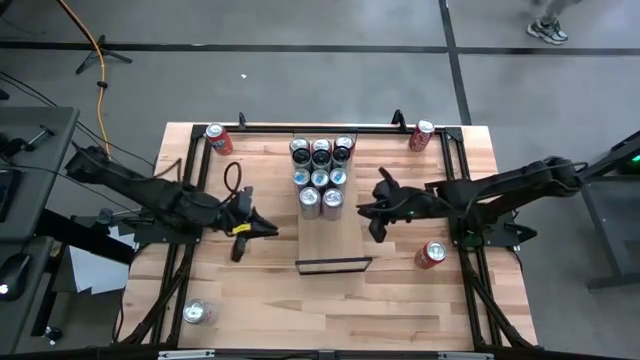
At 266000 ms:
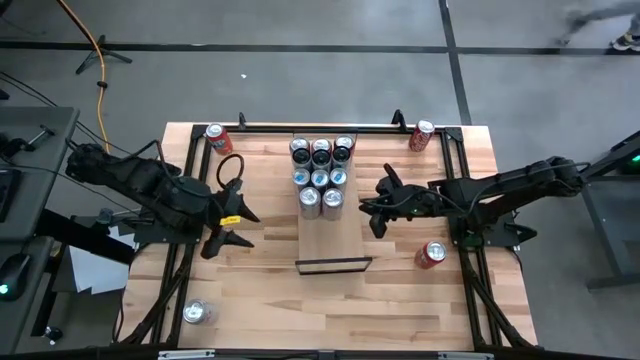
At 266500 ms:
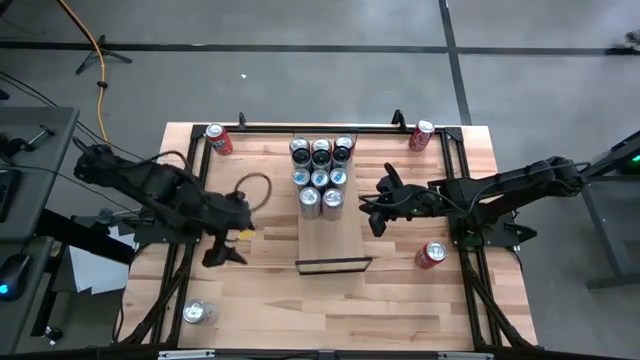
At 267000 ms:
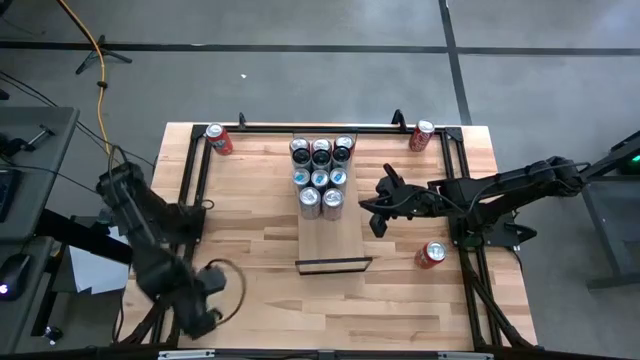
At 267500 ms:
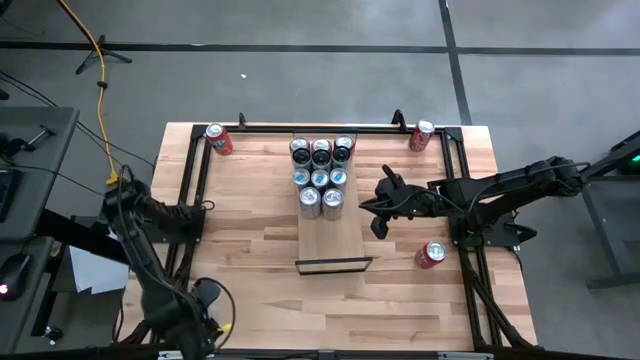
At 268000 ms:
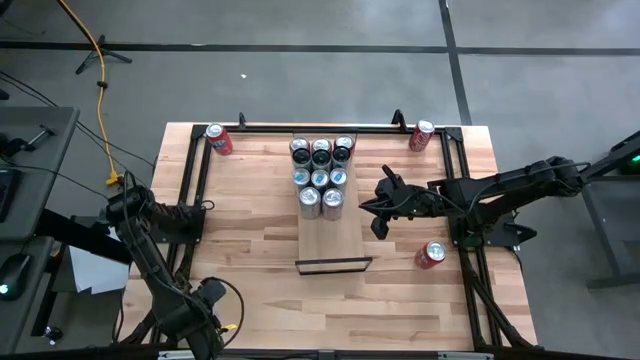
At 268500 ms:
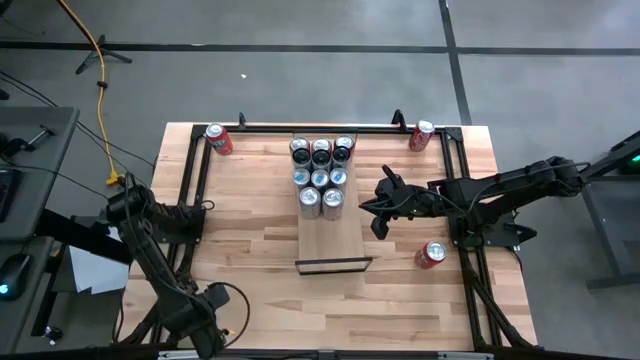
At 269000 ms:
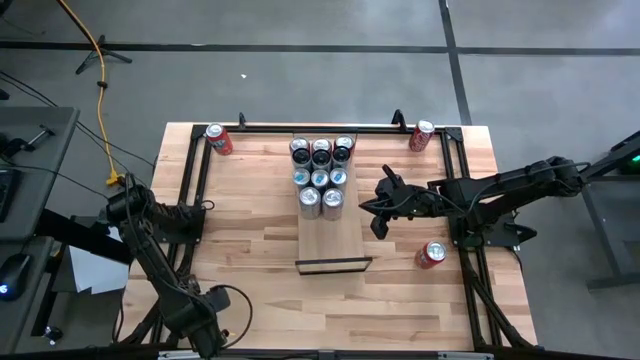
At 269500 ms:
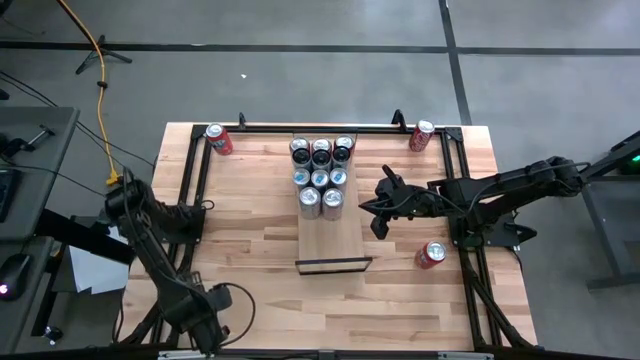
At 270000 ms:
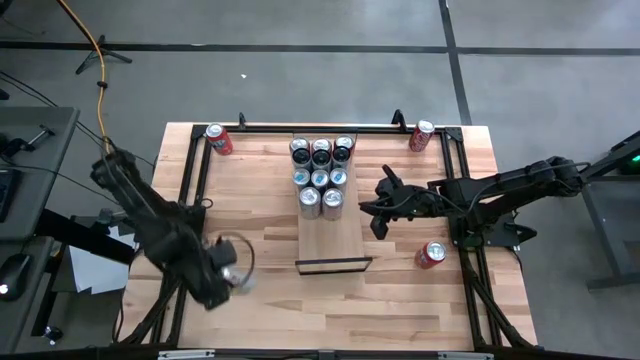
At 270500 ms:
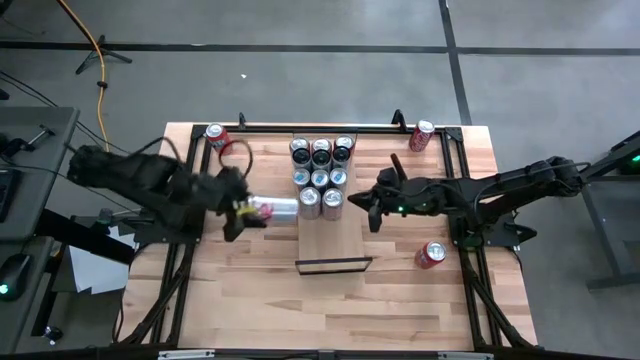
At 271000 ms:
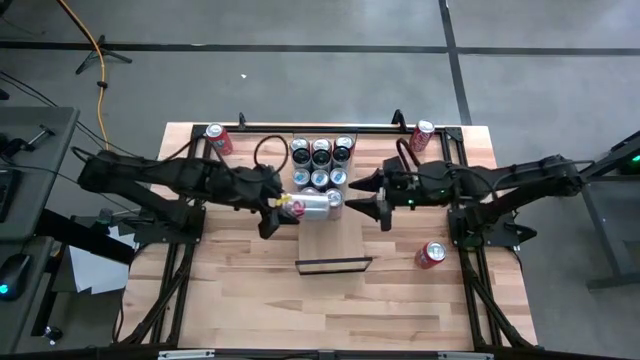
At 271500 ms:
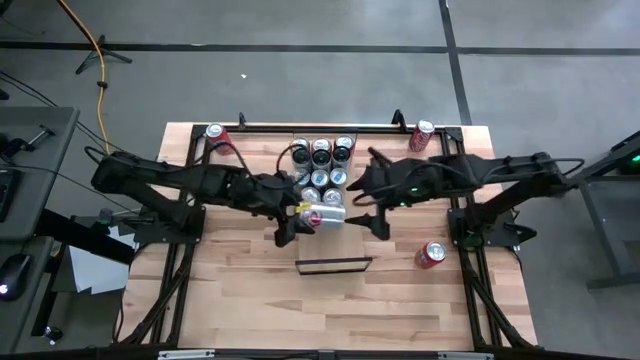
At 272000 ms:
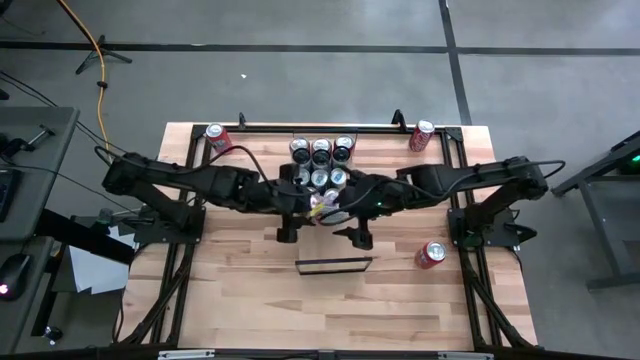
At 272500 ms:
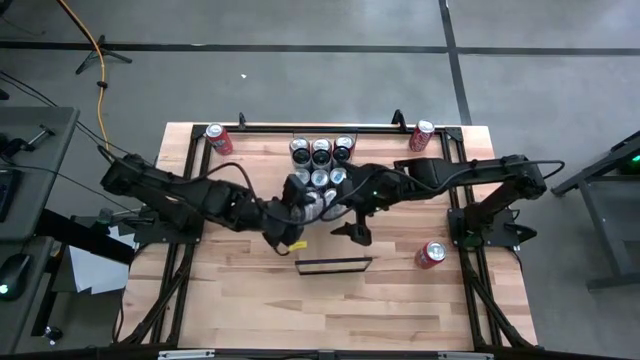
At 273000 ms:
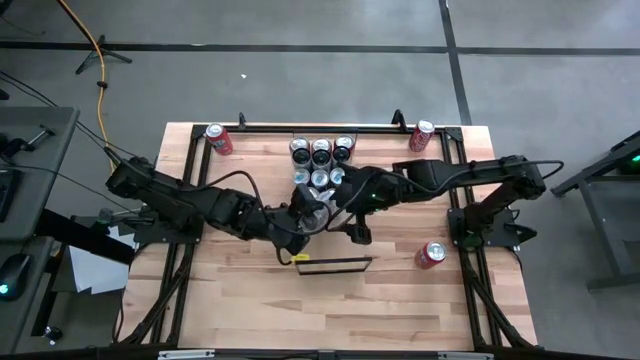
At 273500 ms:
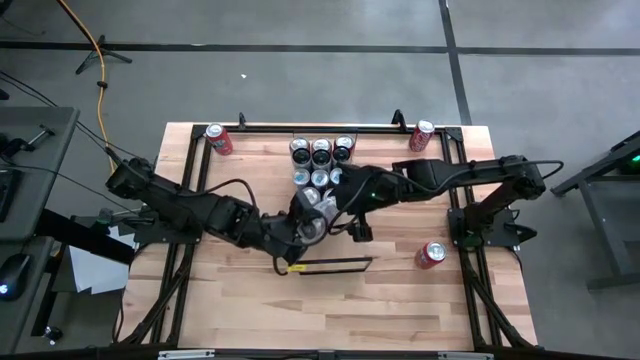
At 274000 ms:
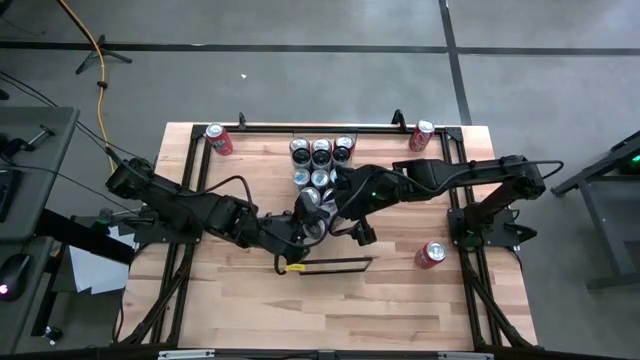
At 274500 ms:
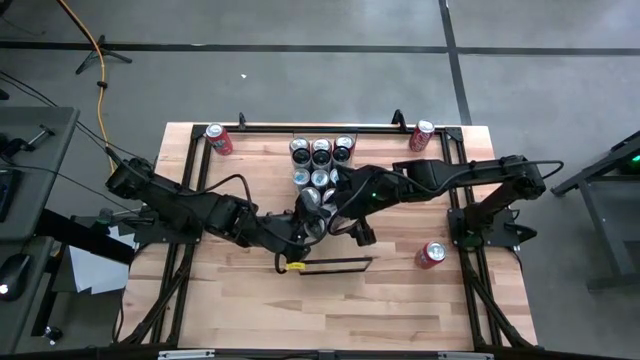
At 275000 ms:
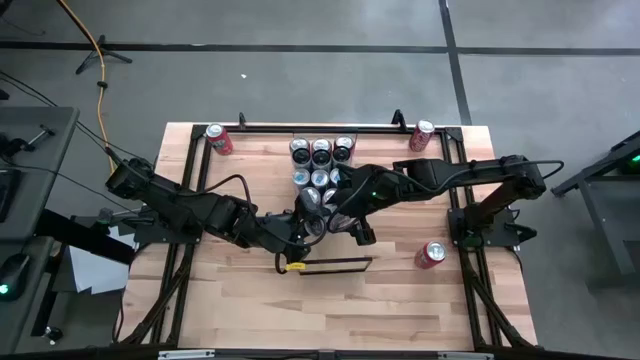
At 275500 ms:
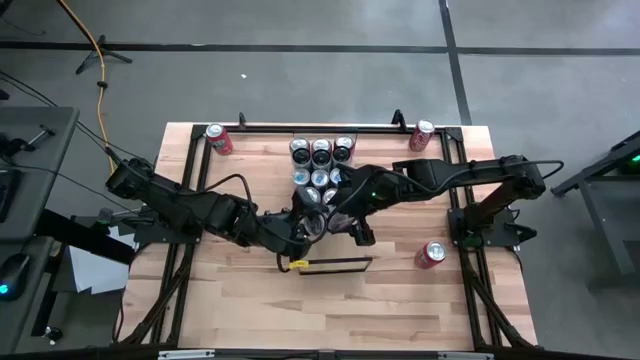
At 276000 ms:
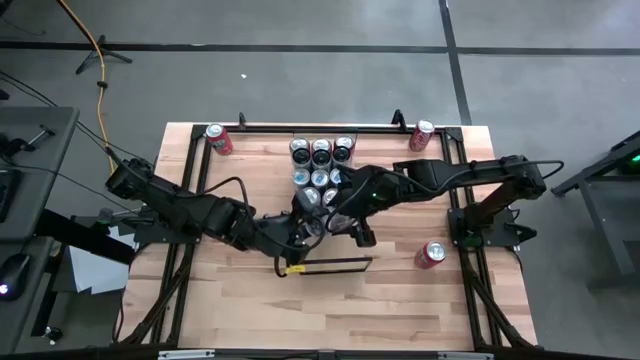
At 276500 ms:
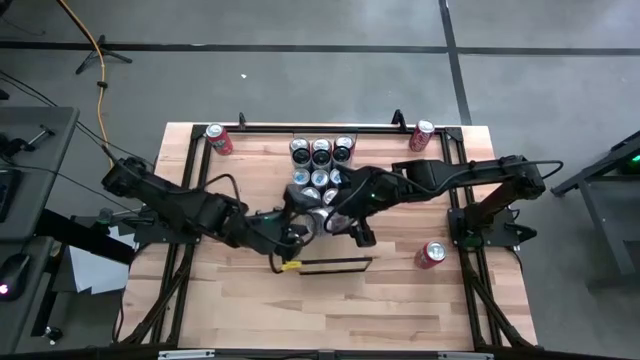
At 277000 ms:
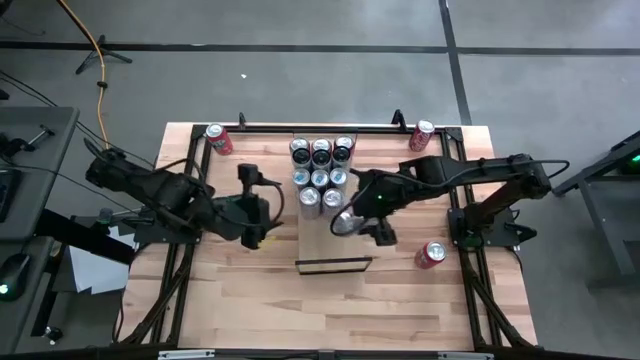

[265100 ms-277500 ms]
Task: Place canned beverage on shelf
Put the silver soda can on the shelf aligned with the other silver soda can

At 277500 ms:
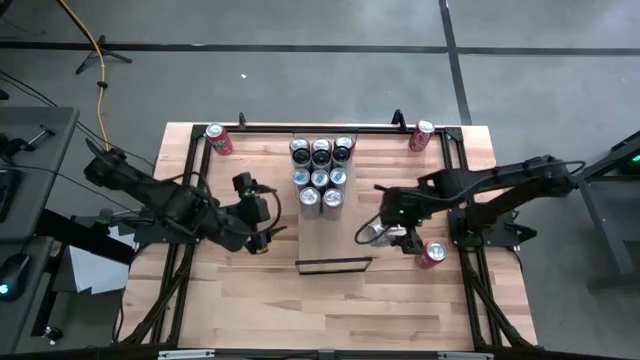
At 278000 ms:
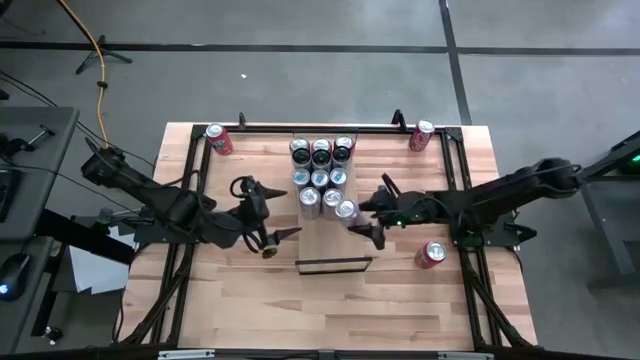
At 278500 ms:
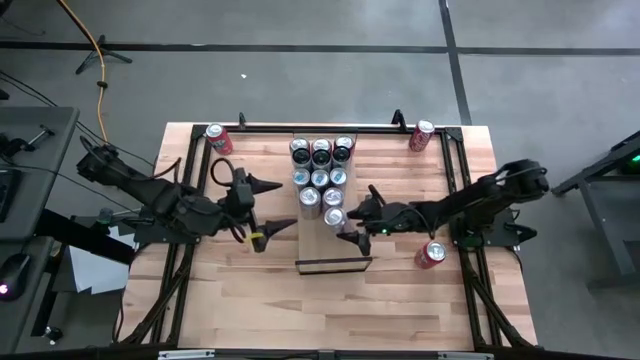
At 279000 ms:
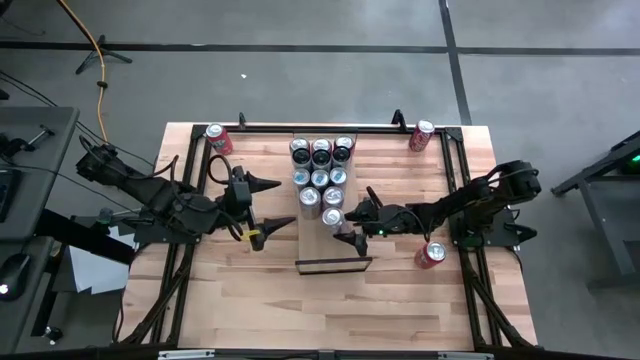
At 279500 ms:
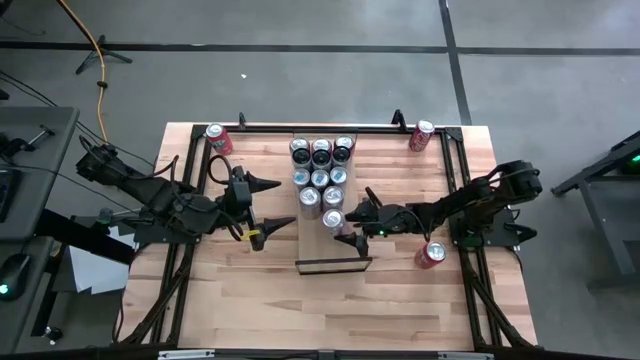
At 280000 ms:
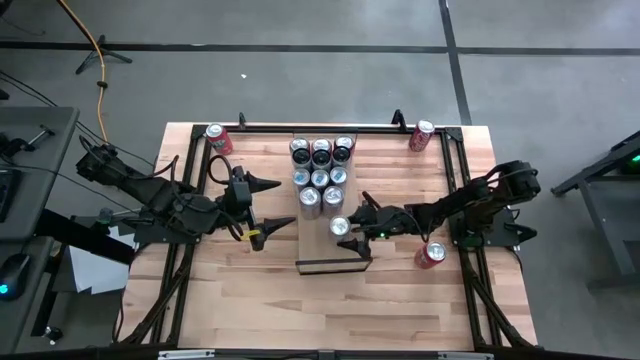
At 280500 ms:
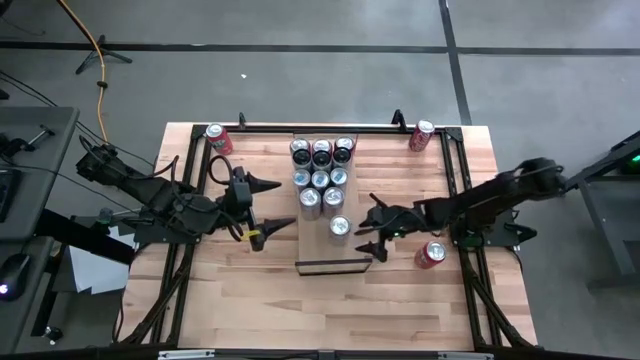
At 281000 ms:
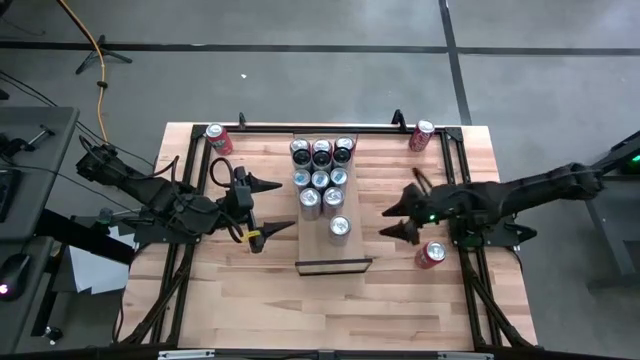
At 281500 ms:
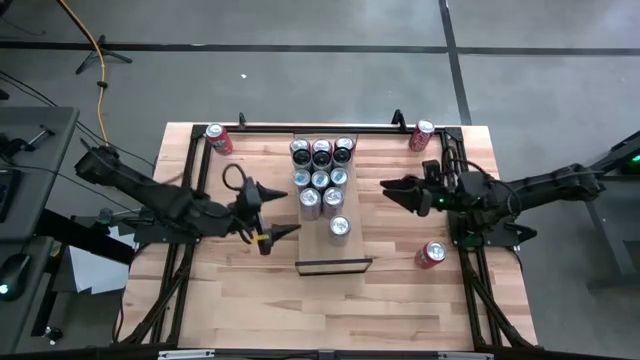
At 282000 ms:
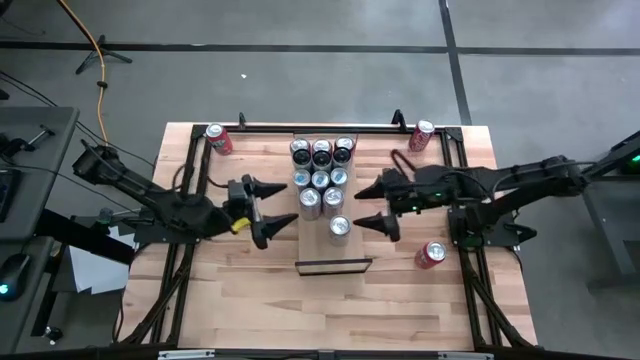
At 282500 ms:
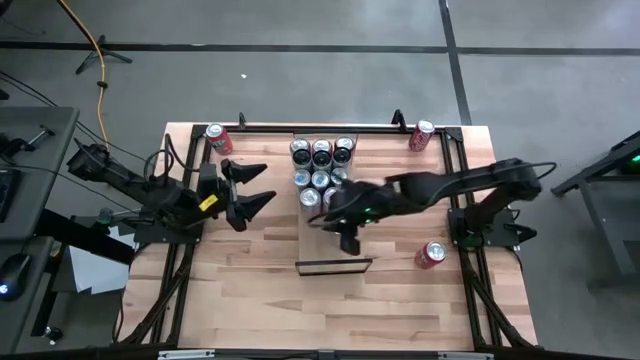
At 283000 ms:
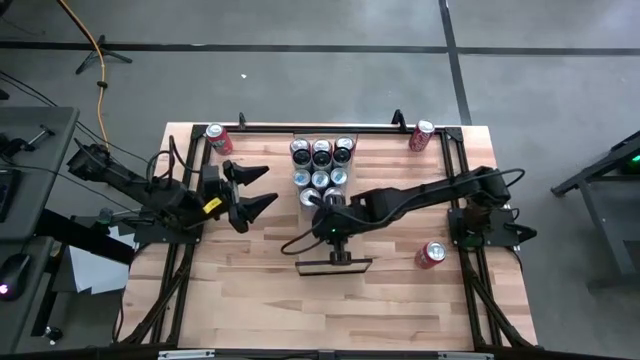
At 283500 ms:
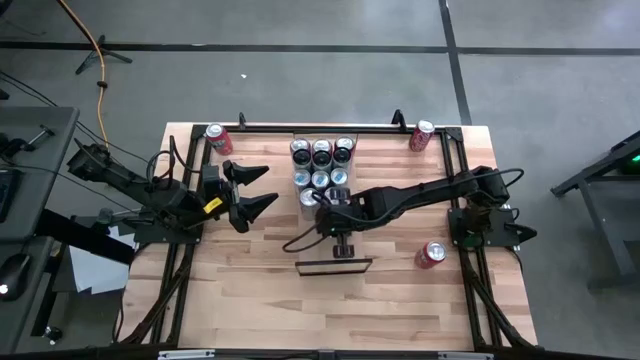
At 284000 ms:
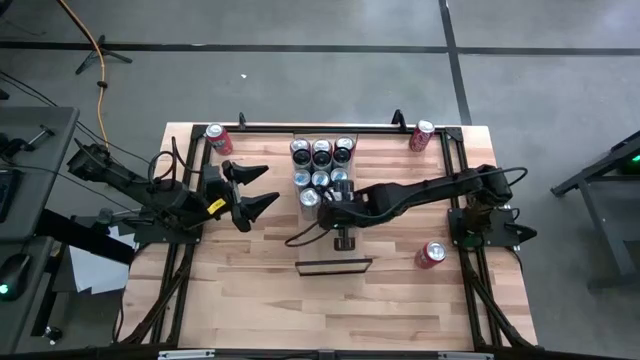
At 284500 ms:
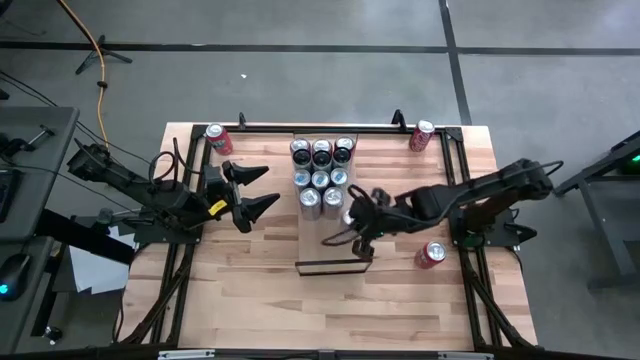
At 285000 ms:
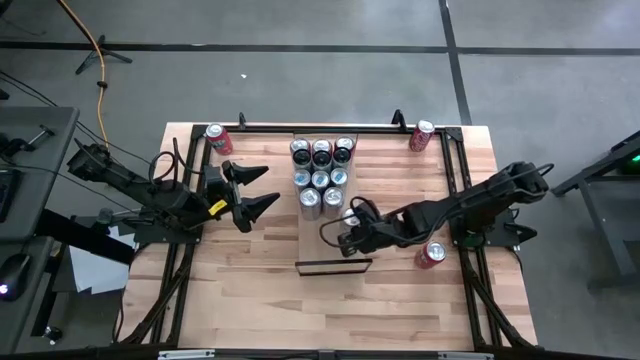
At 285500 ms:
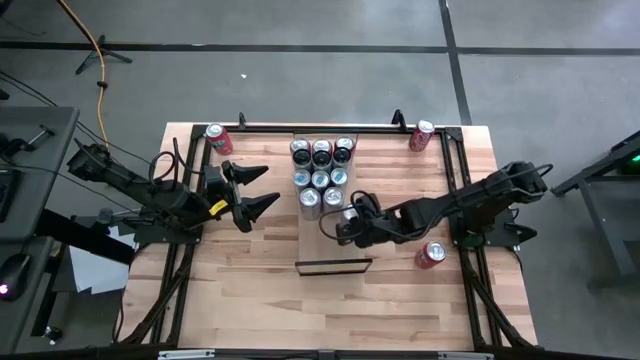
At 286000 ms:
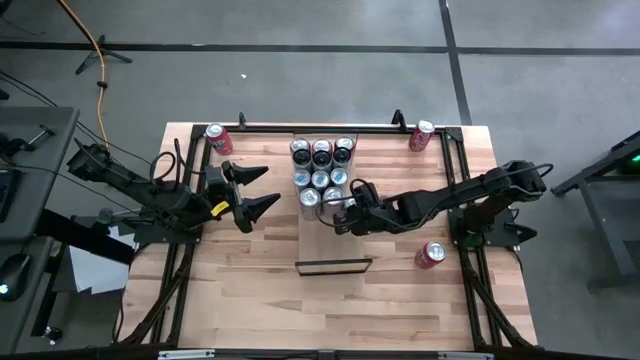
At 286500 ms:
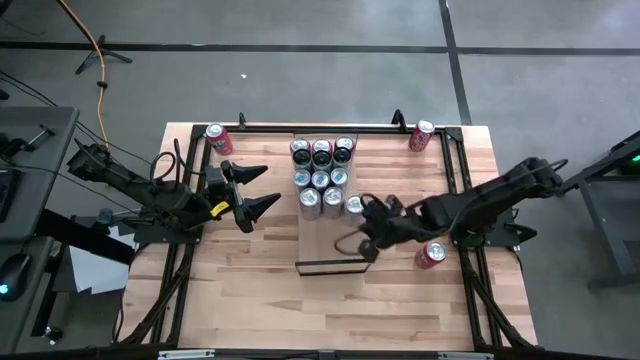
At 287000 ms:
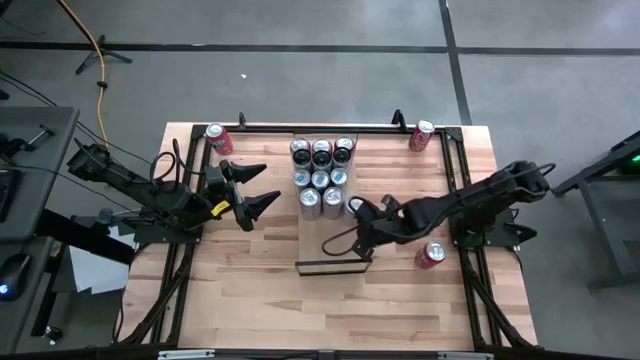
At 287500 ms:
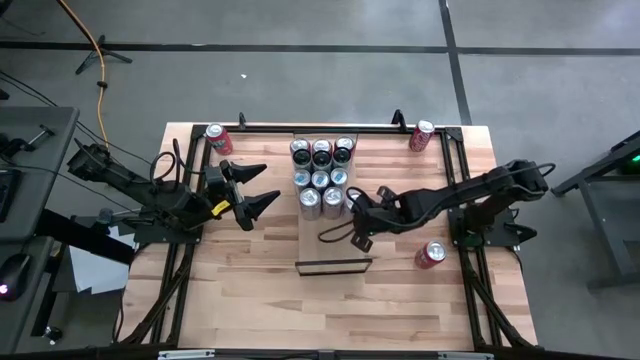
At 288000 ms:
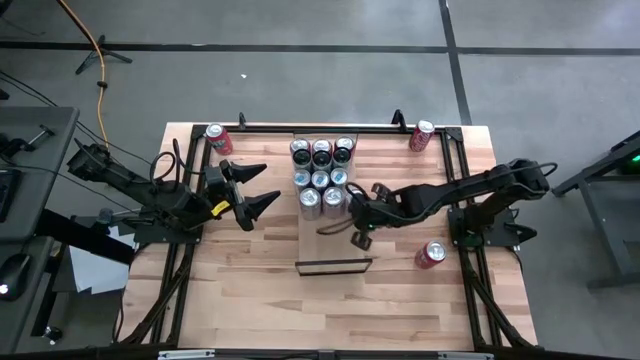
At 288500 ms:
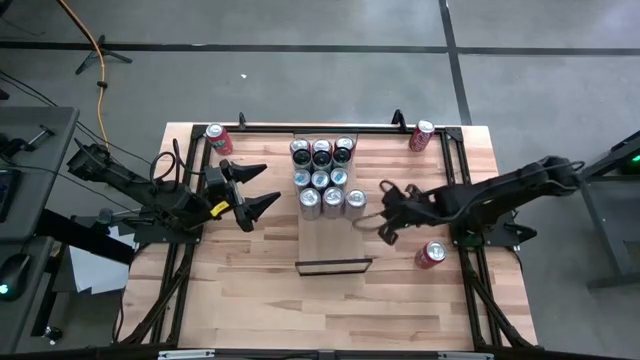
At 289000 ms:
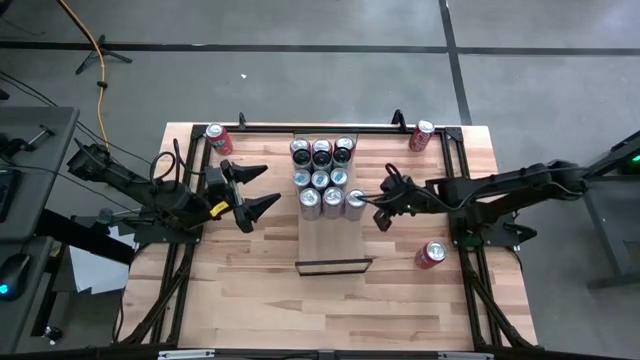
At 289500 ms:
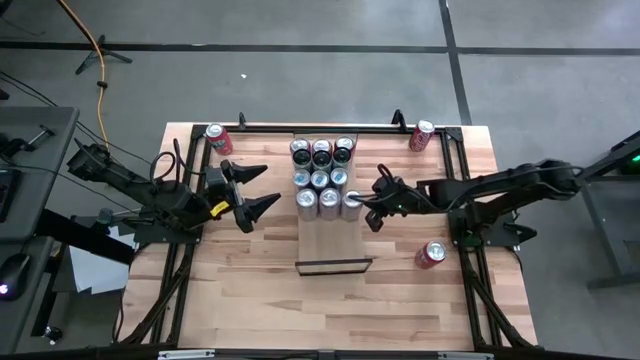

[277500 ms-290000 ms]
Put the silver soda can on the shelf aligned with the other silver soda can
